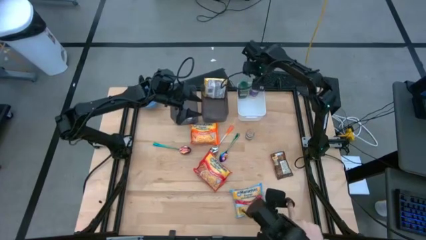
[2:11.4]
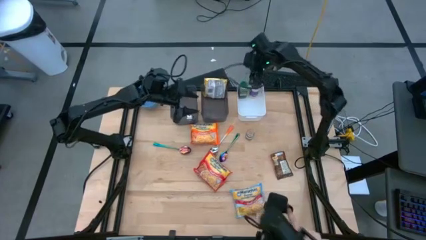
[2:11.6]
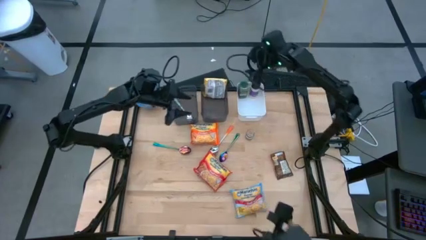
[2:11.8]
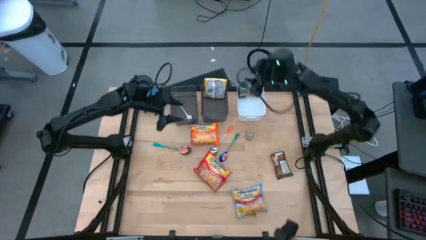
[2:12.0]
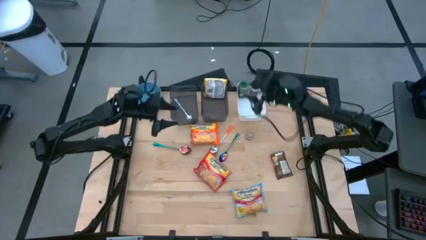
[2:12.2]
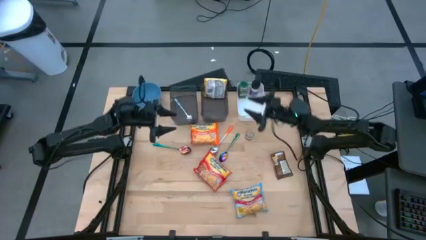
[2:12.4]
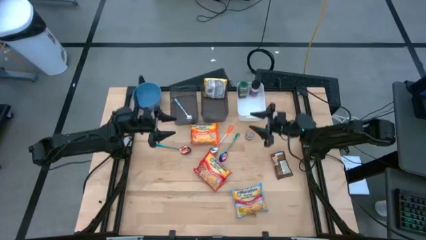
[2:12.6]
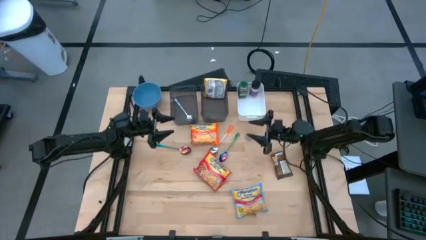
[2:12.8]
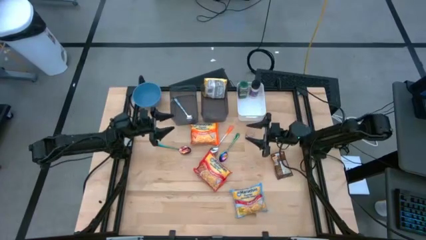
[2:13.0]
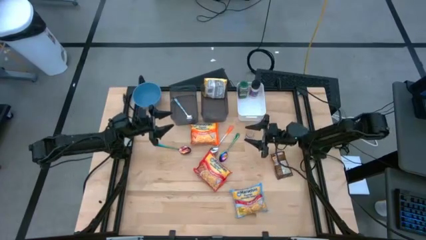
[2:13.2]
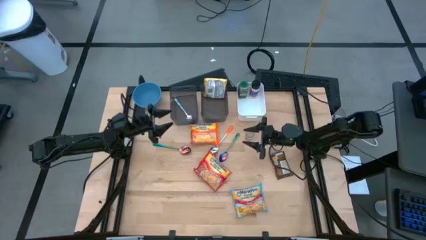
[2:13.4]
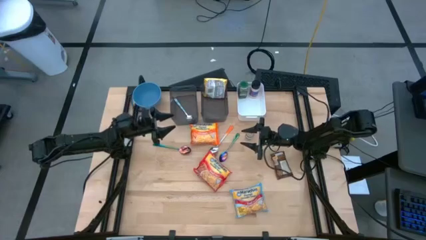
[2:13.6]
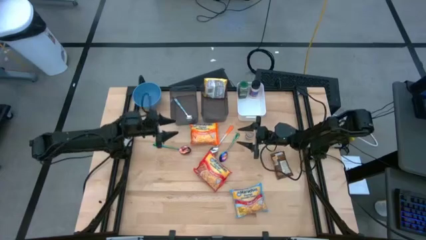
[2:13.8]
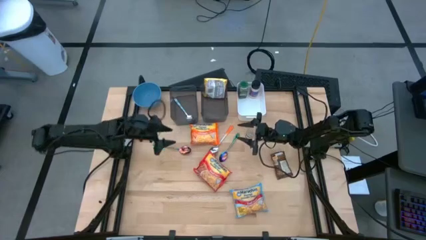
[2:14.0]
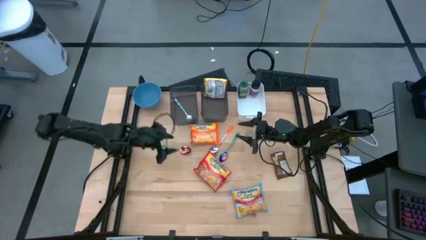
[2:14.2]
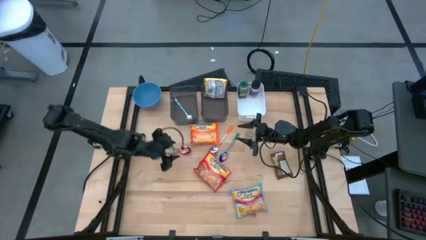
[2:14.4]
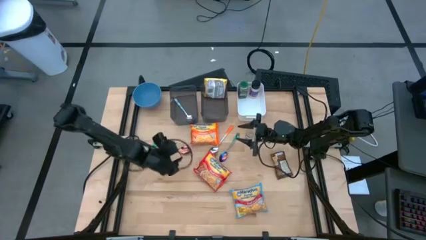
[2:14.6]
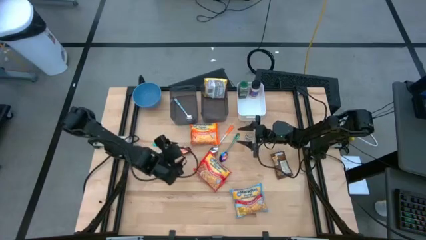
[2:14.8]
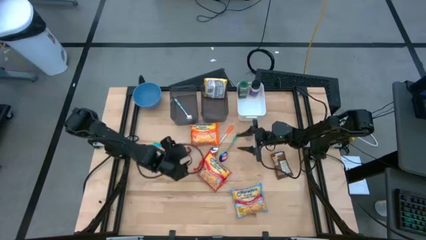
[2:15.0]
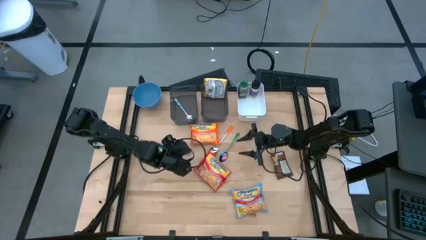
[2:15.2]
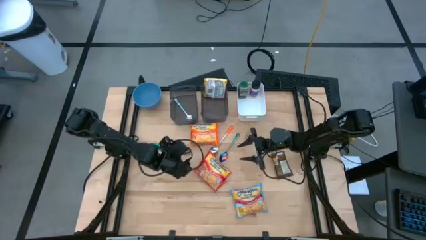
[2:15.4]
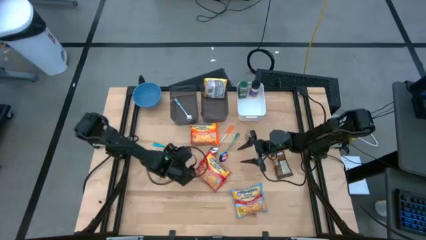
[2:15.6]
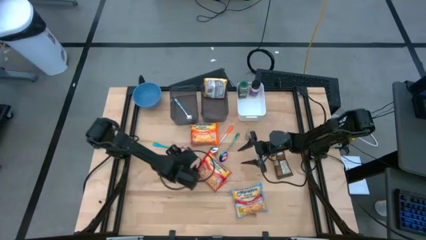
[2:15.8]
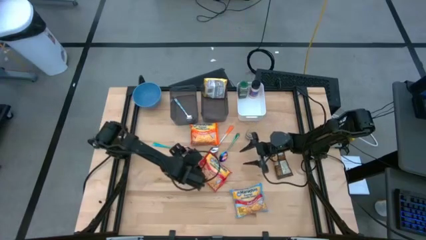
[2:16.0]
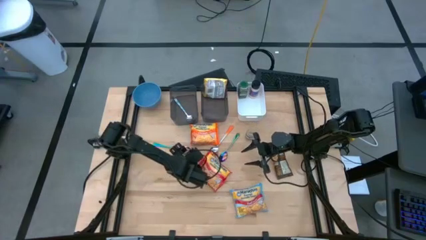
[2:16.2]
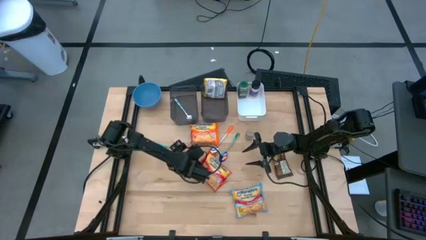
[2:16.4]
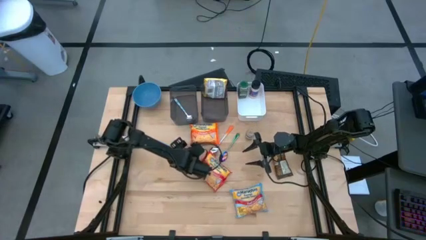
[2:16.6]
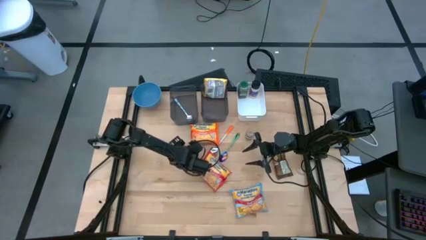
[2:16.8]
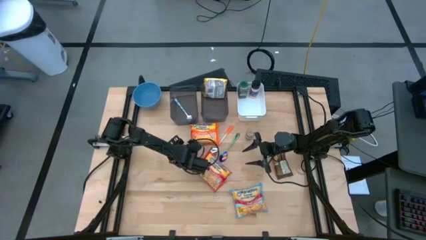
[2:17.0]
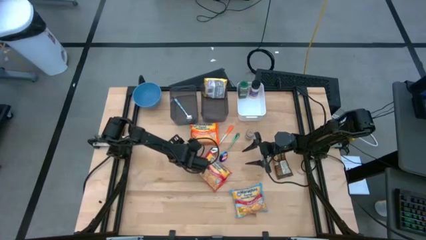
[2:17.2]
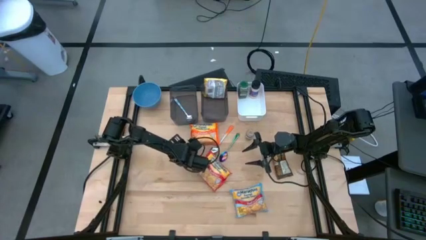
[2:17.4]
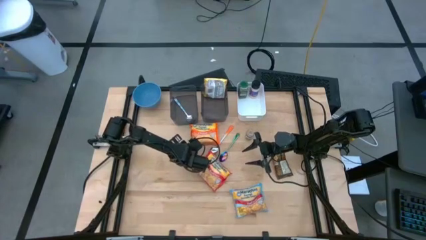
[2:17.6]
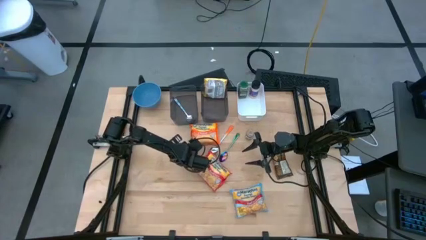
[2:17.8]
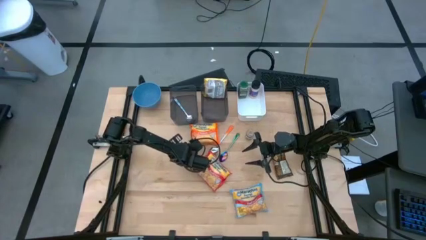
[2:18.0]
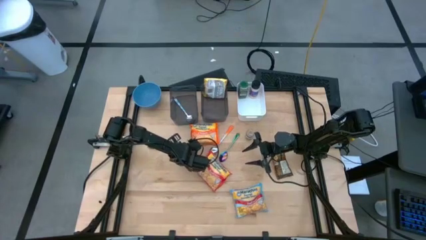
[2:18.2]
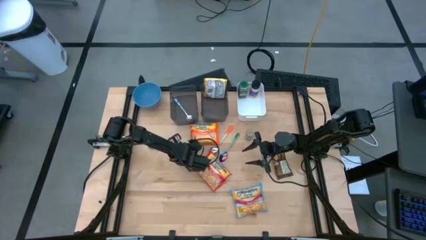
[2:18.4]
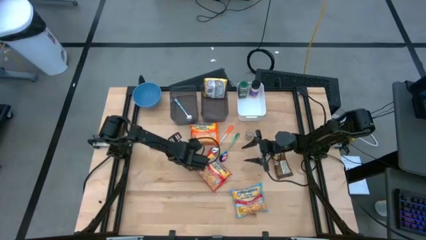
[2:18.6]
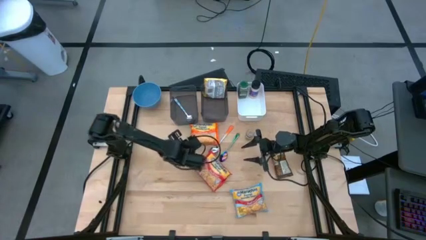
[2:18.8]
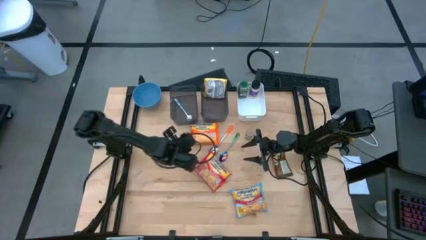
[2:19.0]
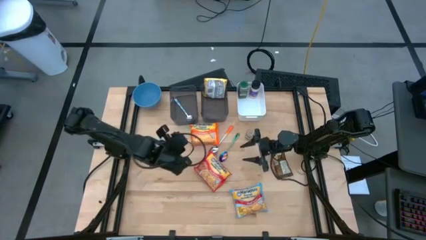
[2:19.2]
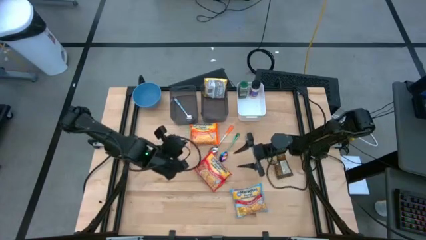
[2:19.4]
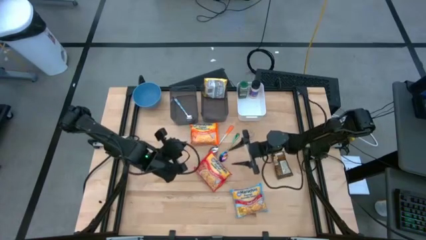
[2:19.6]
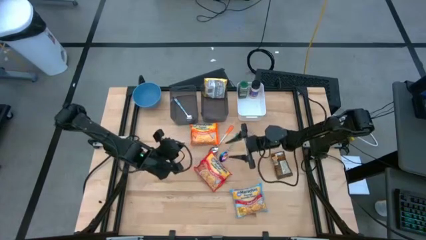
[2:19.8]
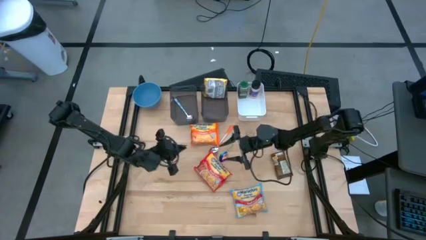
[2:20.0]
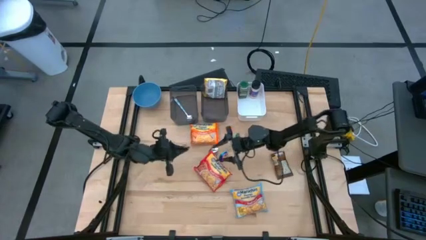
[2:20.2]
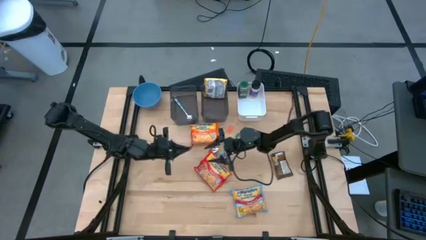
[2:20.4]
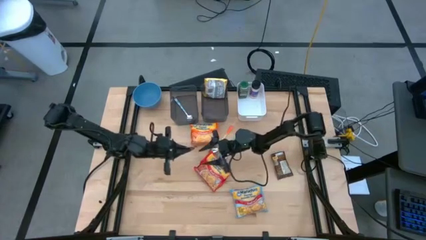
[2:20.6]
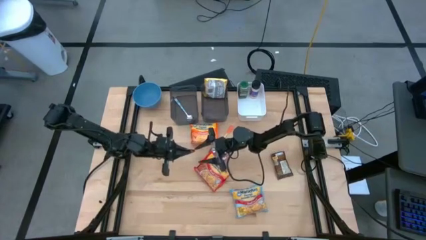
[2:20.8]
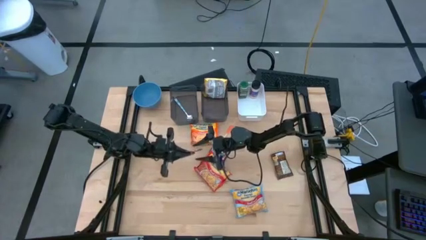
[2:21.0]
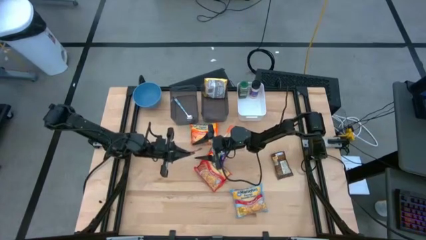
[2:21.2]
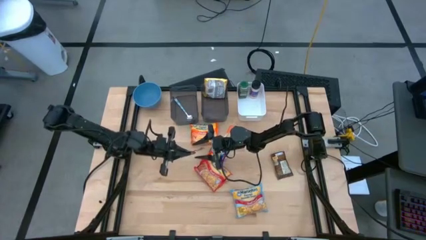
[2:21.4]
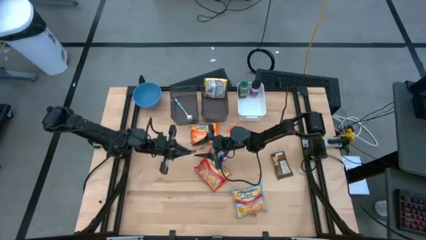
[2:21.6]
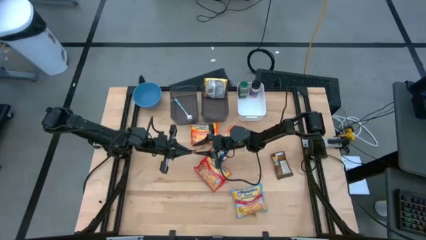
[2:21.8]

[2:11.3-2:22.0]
Task: Pick & Place Food Item
Put the blue spoon into the left black bin

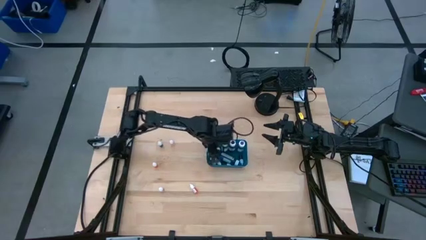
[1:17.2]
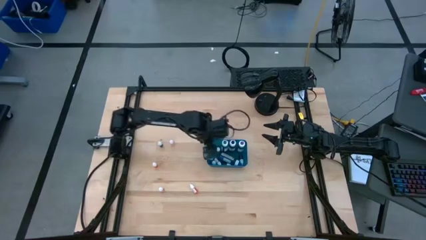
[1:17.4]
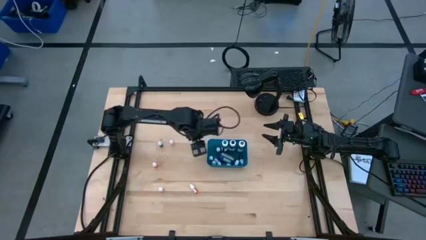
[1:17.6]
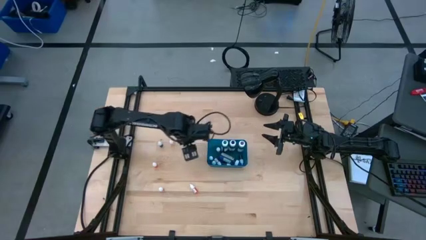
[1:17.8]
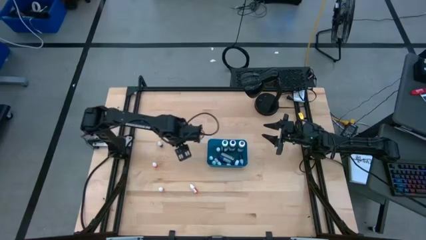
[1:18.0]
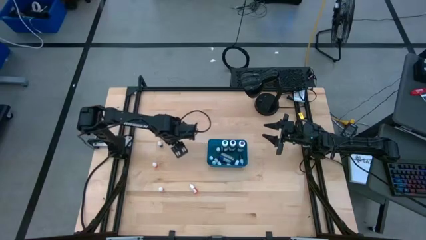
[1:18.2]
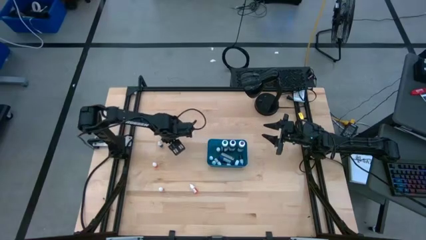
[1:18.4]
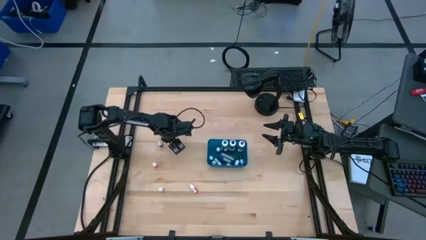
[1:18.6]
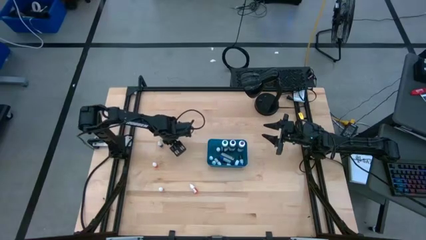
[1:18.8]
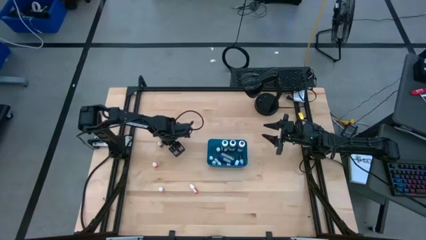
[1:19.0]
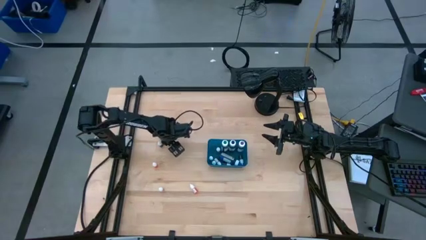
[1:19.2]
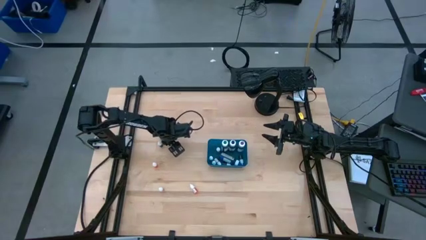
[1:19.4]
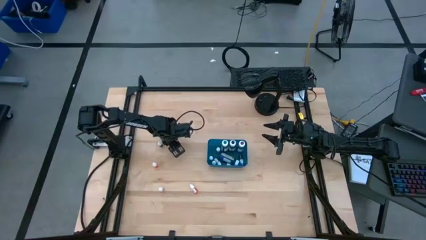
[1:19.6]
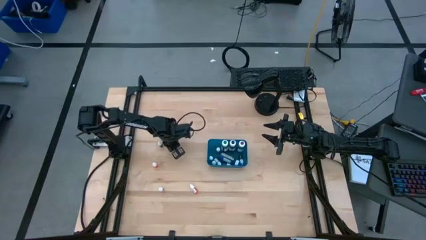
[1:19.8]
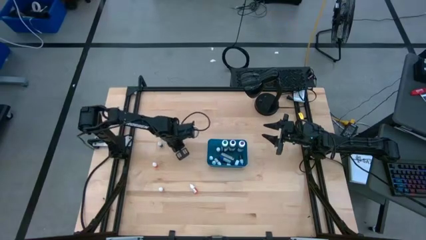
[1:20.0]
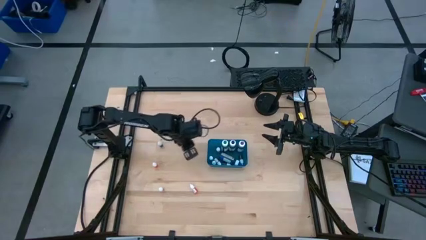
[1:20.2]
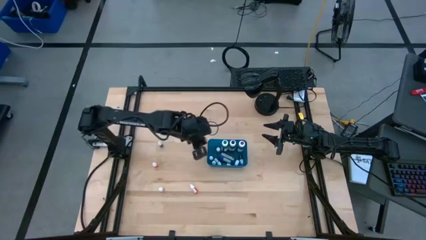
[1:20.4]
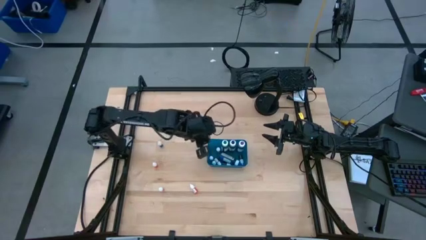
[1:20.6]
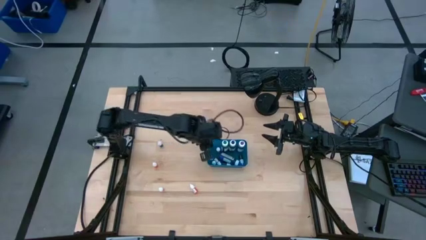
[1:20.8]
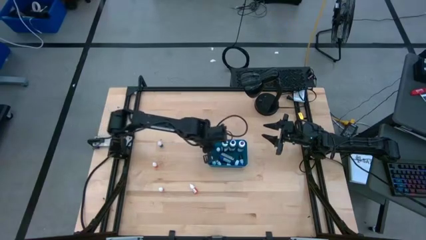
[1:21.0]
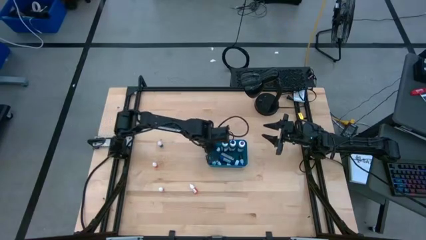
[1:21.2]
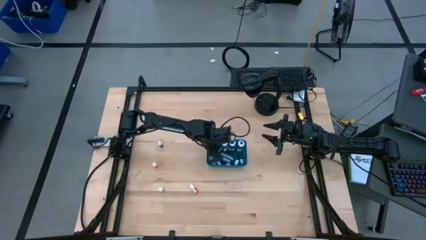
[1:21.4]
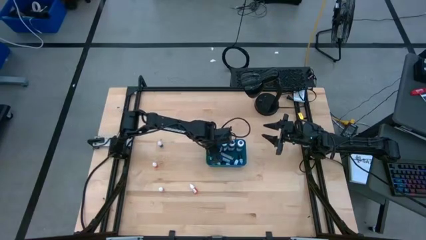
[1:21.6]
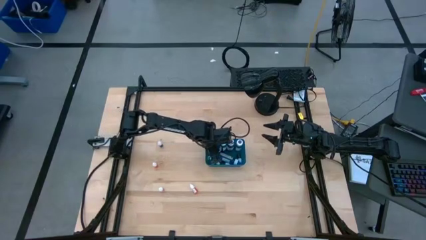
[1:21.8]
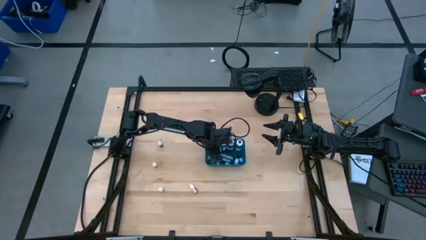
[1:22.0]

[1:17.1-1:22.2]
Task: Pick & Place food coloring
Put the small yellow food coloring bottle into the blue container
